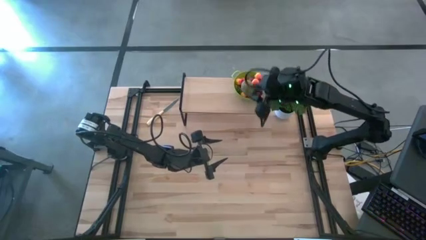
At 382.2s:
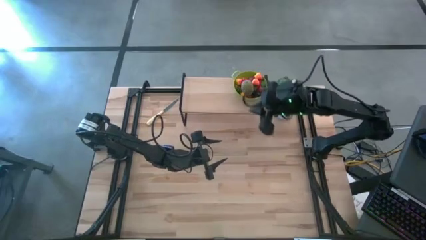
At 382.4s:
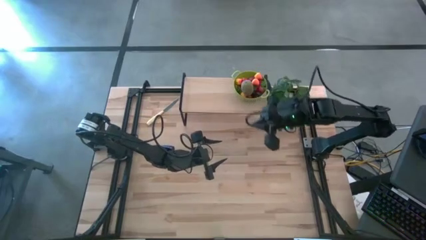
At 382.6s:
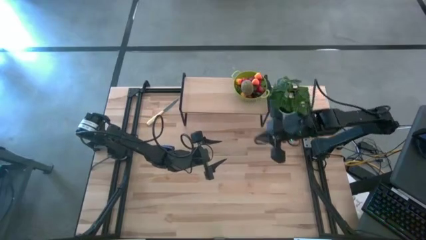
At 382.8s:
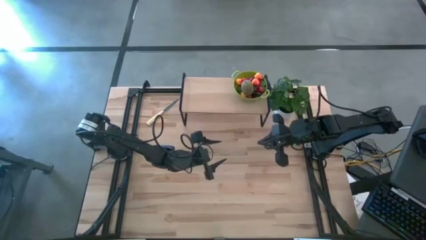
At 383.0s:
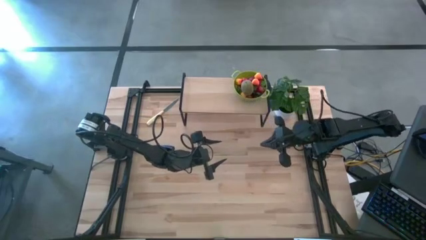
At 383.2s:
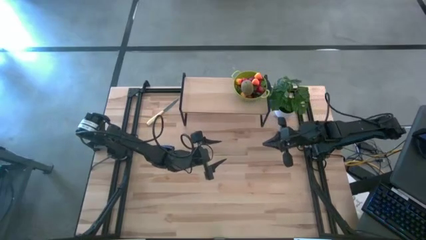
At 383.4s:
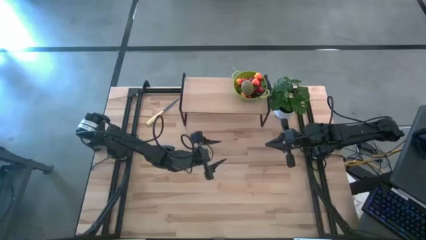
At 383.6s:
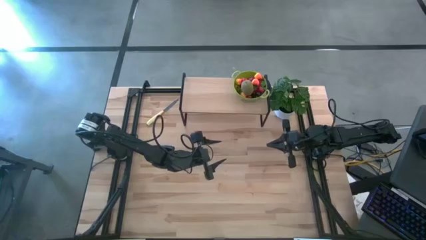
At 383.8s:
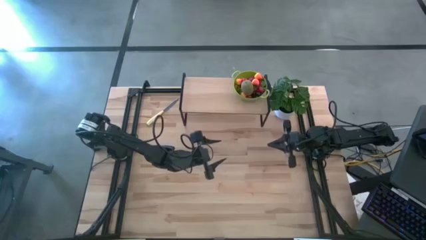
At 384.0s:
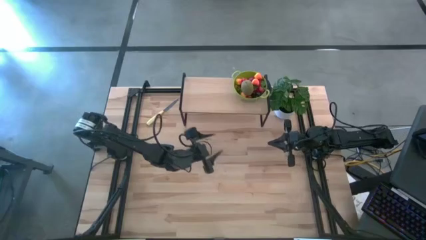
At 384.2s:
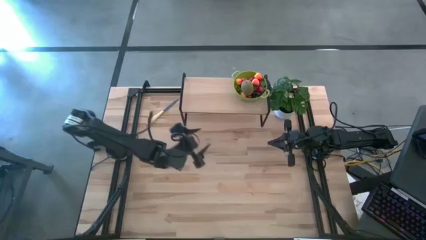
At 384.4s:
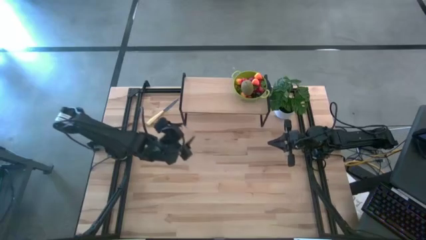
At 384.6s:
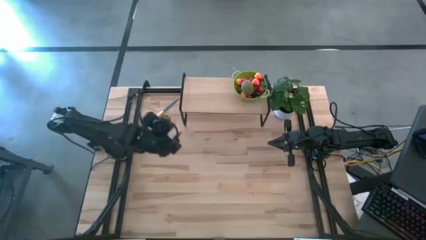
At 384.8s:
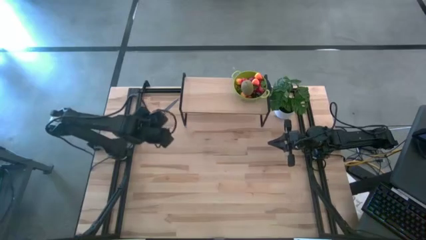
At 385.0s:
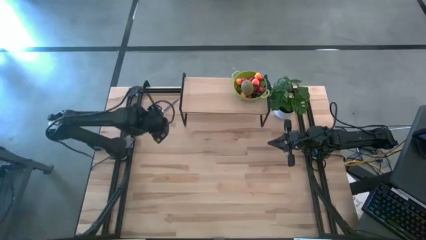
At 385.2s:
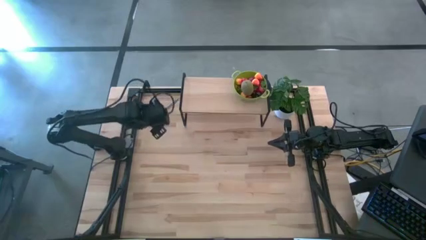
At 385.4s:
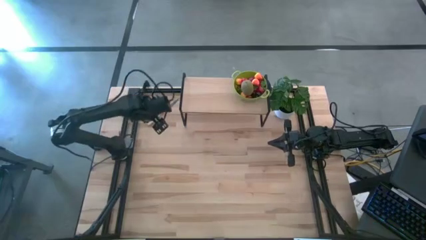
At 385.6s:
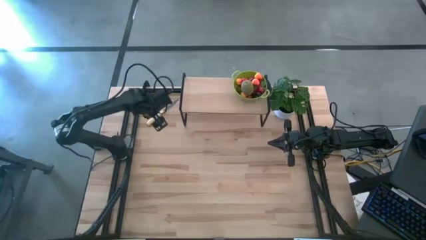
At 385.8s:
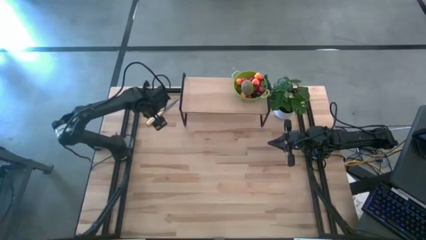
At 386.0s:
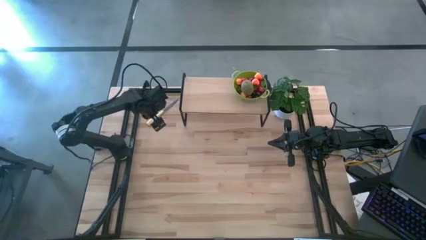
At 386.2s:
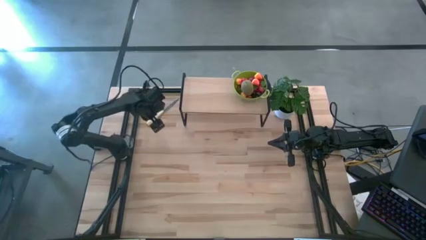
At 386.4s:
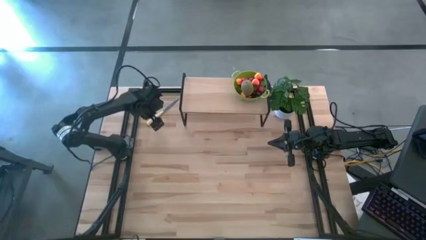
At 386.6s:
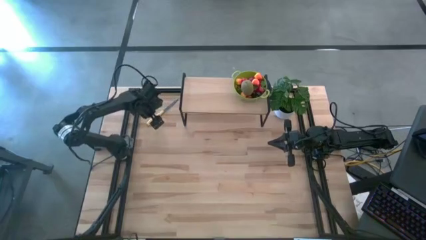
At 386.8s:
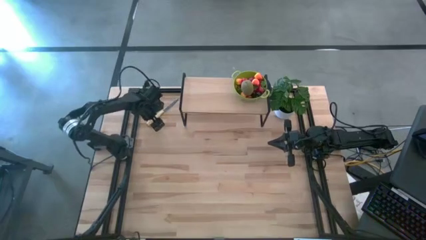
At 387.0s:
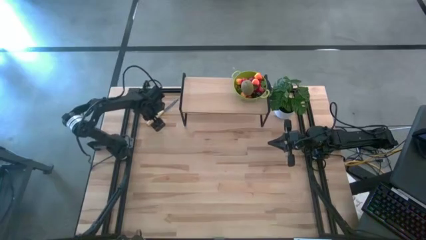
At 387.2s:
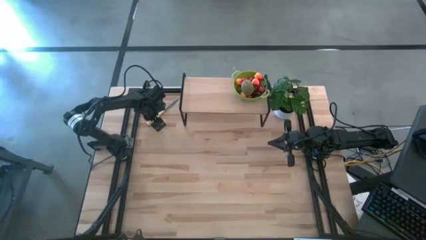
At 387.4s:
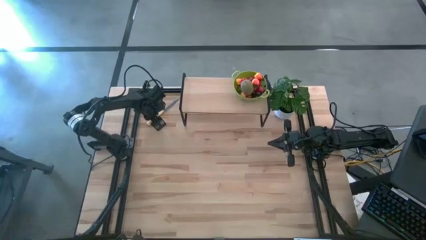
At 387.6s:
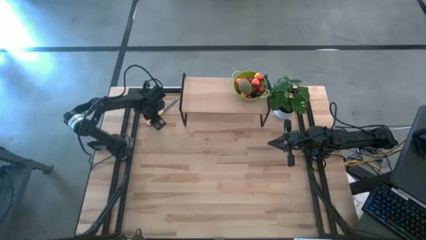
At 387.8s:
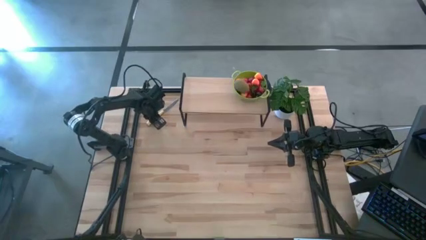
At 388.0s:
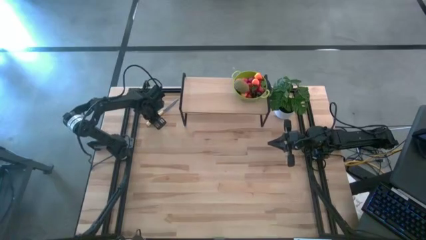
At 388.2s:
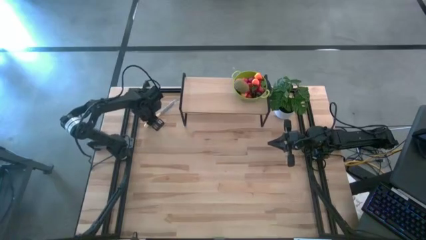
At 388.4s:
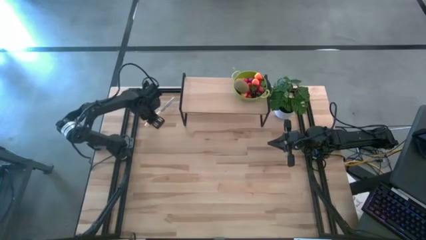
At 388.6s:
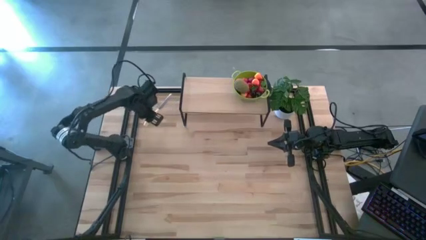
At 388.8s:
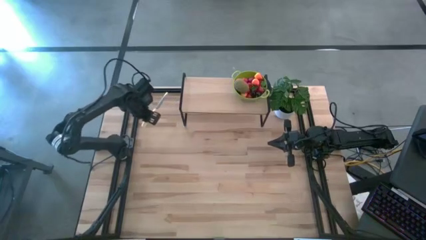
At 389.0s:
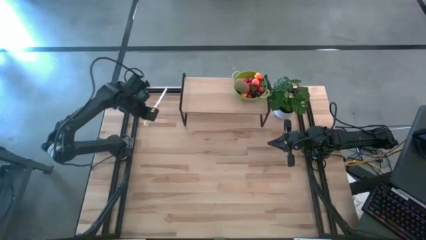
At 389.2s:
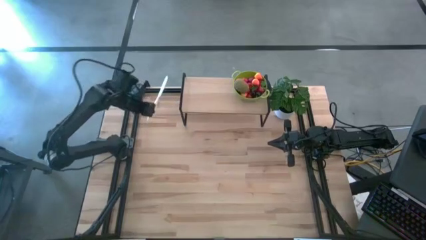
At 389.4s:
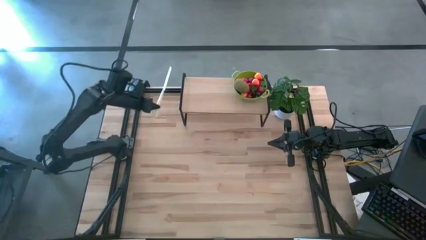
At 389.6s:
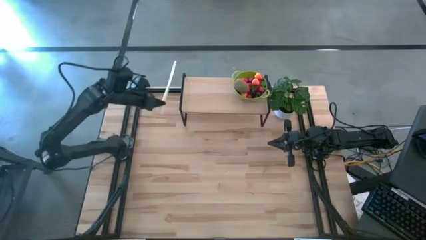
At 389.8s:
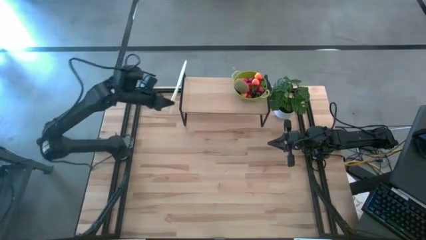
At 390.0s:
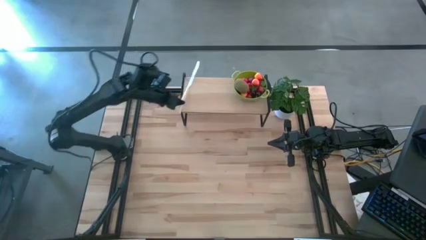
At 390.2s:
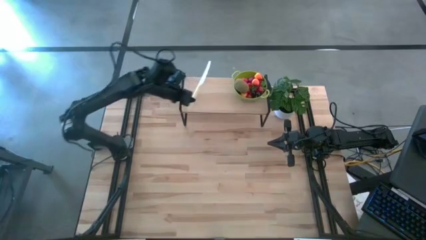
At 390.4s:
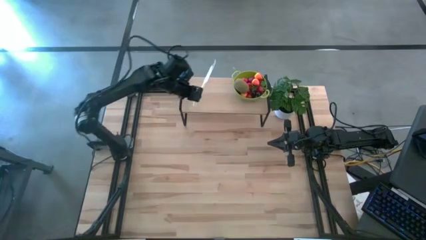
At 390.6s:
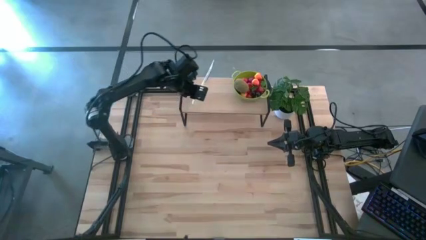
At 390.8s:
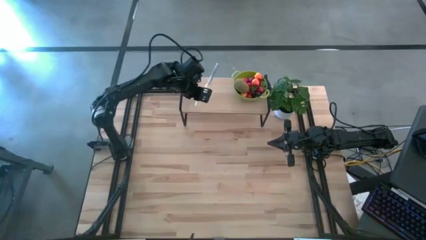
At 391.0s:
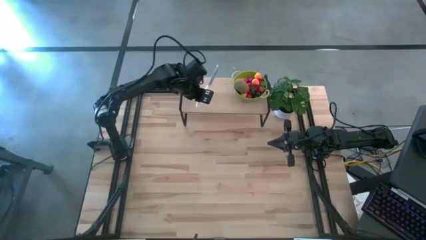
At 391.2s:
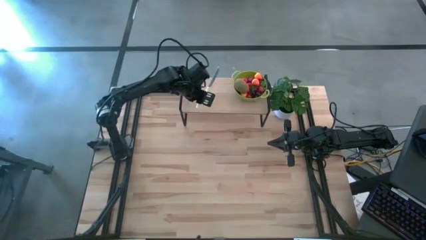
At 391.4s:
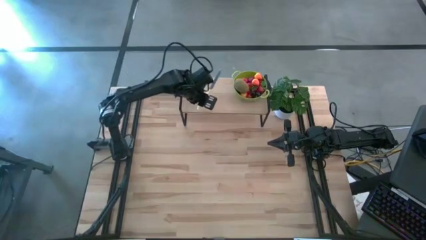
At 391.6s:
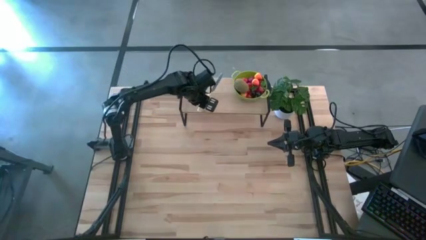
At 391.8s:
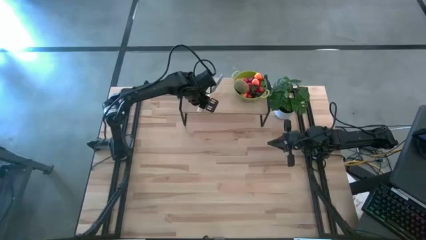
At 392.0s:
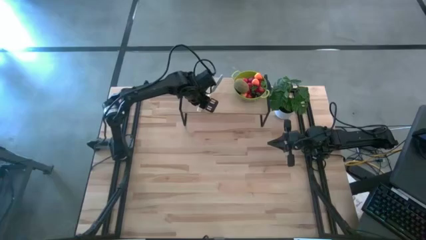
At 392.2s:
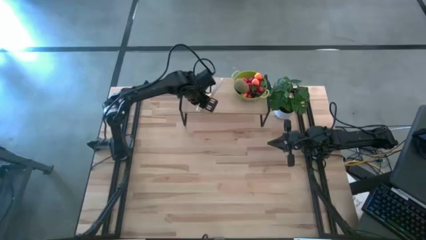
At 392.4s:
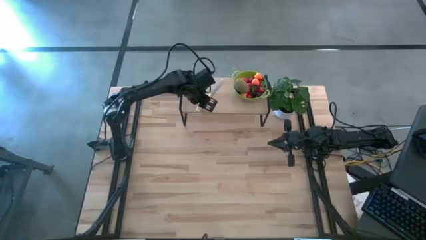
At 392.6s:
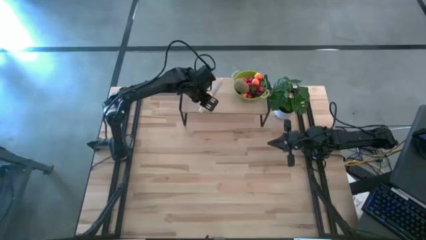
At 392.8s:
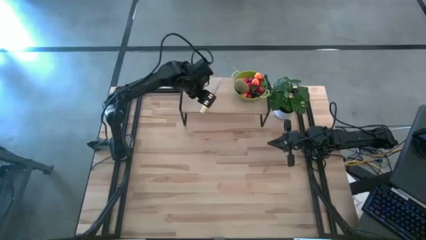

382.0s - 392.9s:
Task: Build produce basket
Put the yellow knife on the shelf

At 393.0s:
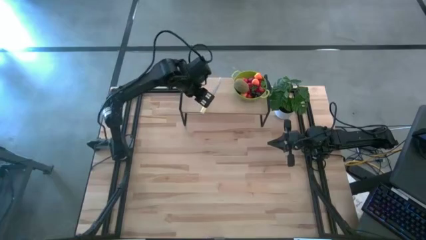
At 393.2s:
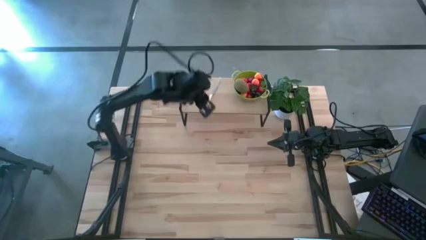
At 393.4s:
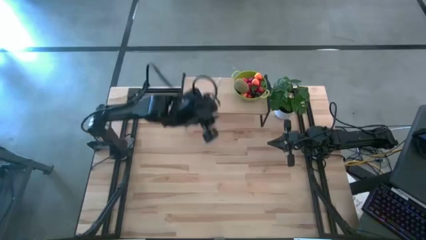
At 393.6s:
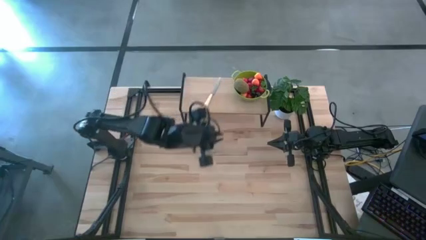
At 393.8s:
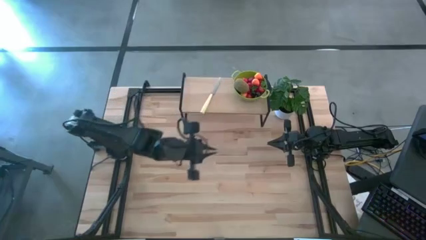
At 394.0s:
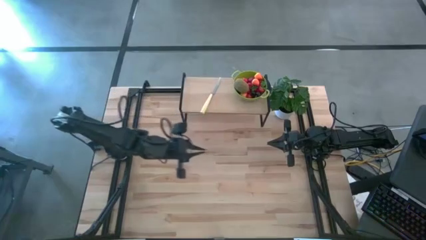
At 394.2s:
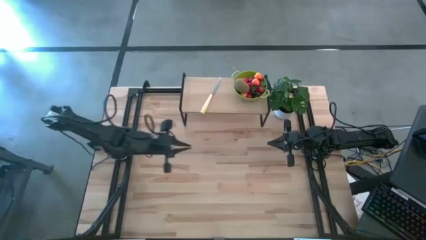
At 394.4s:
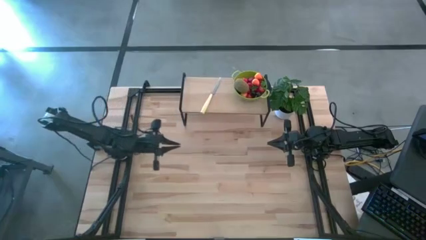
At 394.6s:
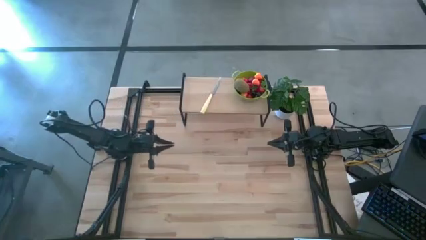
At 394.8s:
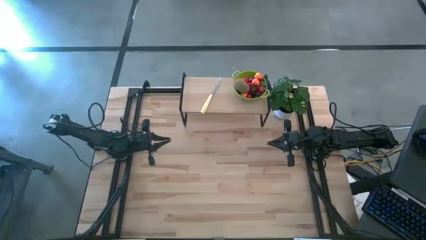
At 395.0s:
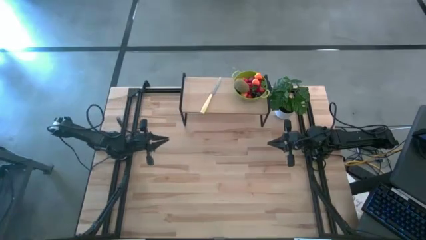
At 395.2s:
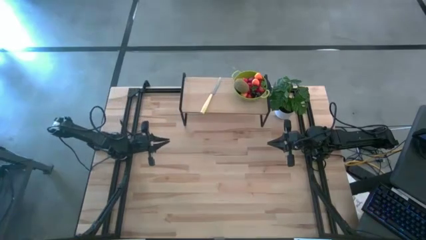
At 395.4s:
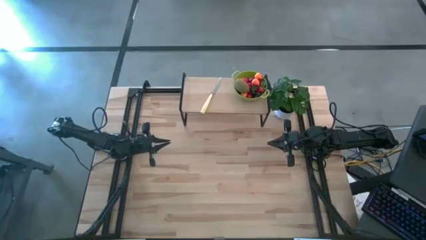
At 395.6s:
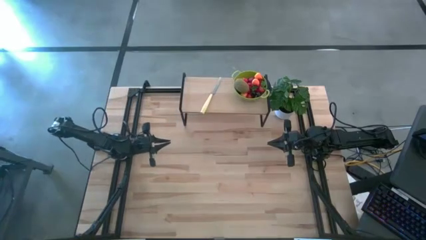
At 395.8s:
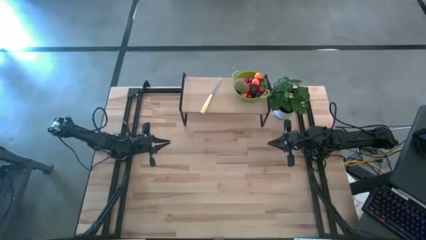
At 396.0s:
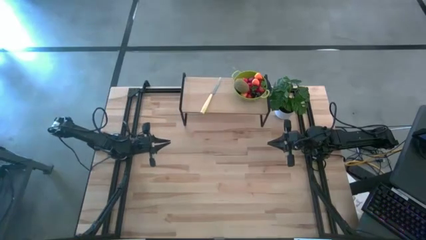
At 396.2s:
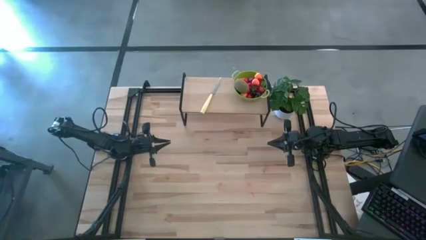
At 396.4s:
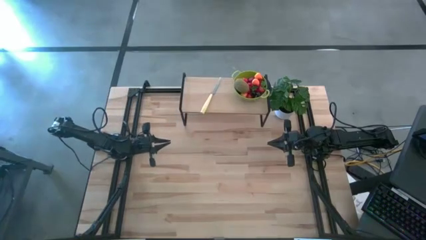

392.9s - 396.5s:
Return to Home Position
